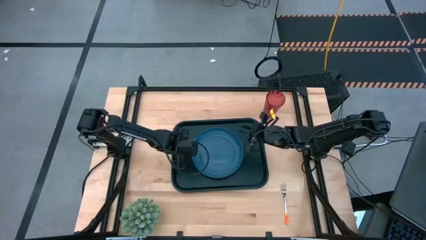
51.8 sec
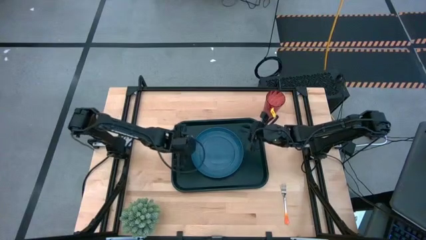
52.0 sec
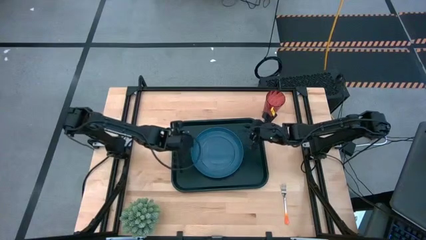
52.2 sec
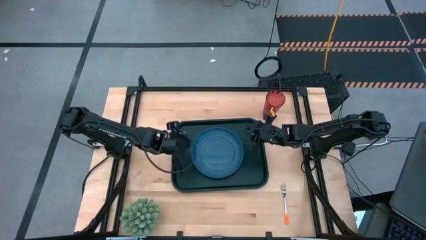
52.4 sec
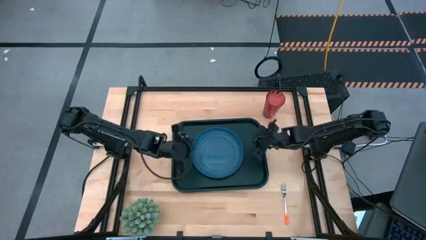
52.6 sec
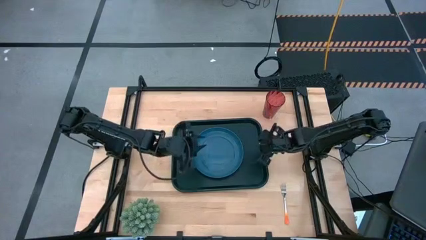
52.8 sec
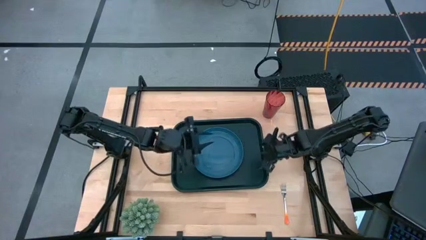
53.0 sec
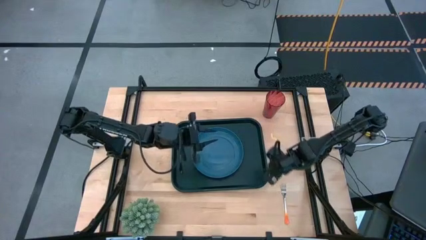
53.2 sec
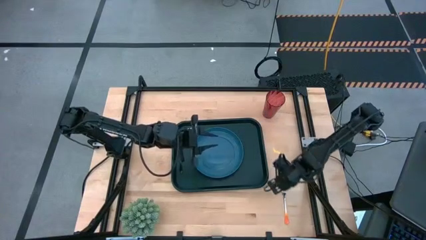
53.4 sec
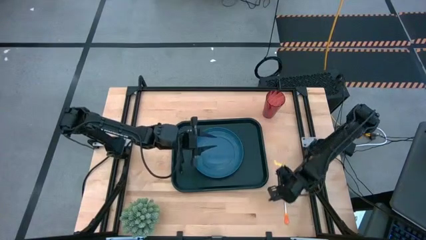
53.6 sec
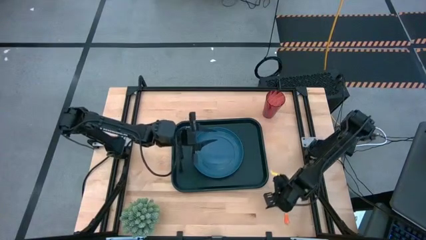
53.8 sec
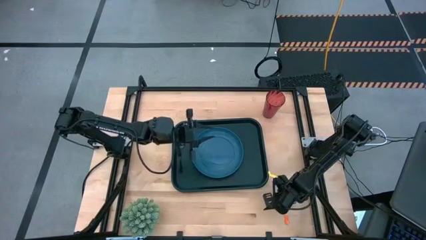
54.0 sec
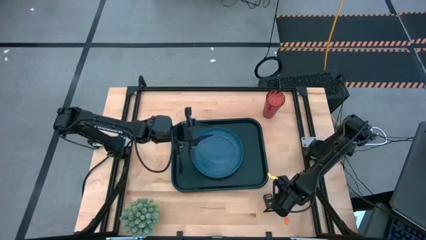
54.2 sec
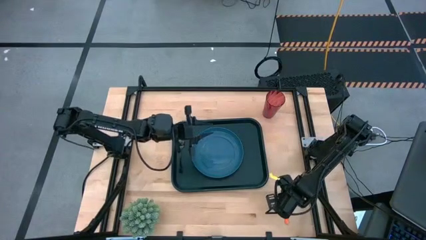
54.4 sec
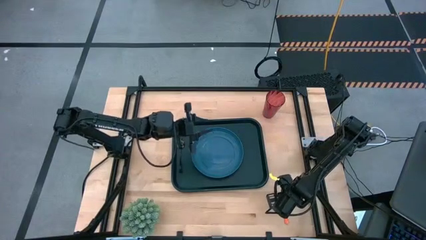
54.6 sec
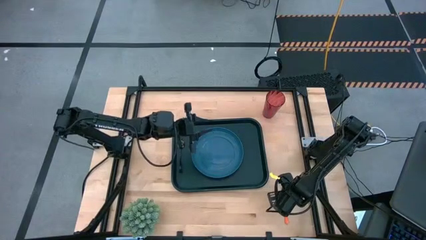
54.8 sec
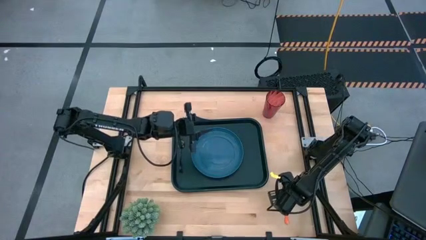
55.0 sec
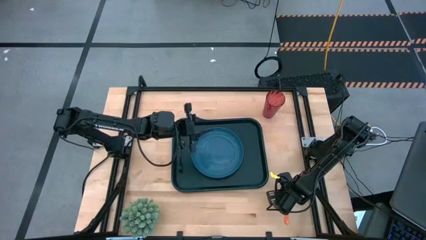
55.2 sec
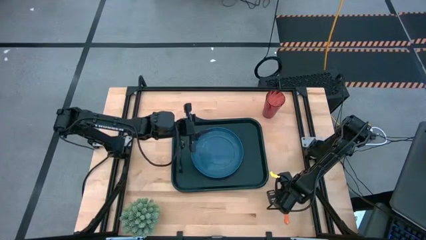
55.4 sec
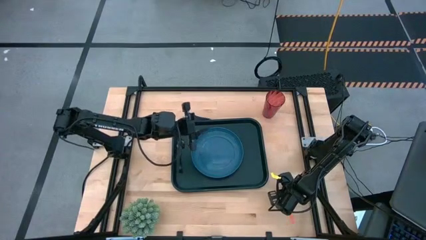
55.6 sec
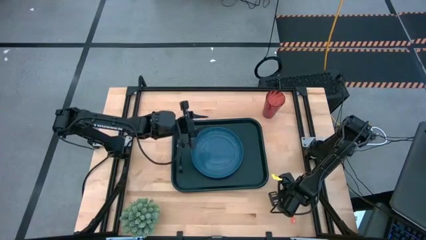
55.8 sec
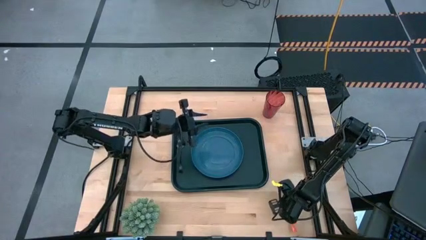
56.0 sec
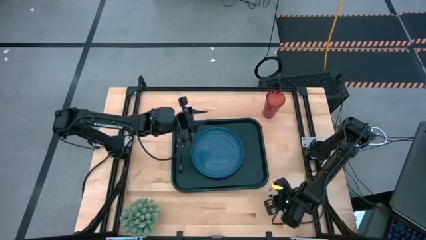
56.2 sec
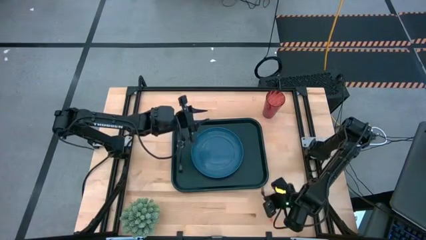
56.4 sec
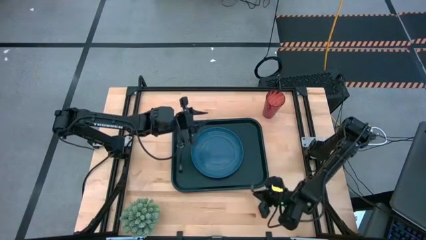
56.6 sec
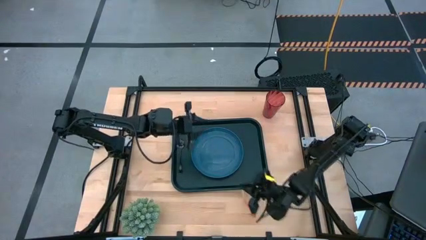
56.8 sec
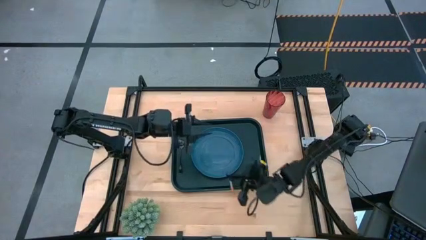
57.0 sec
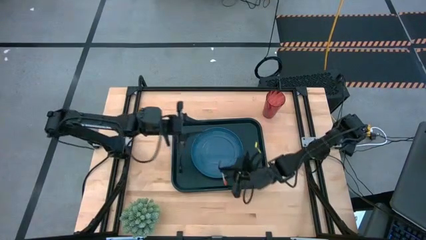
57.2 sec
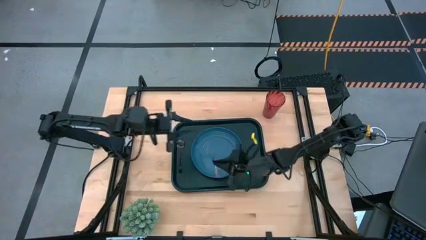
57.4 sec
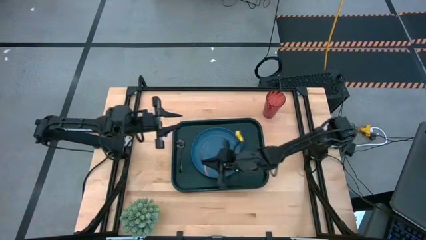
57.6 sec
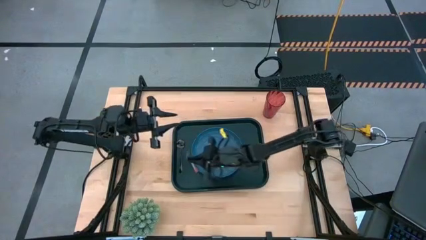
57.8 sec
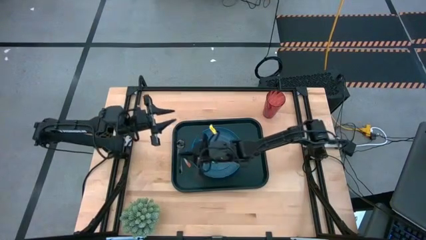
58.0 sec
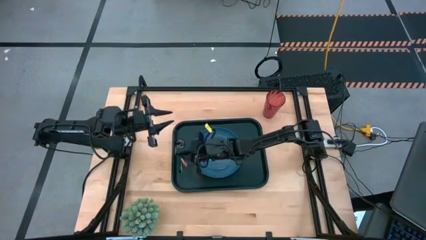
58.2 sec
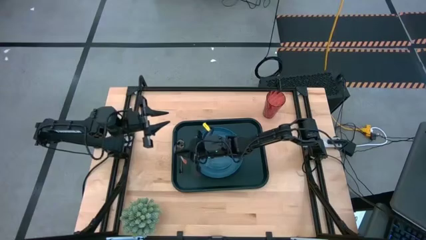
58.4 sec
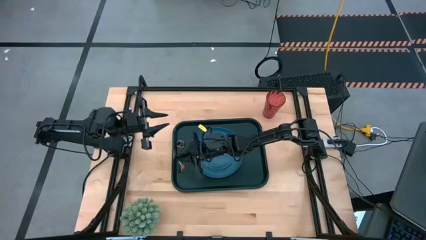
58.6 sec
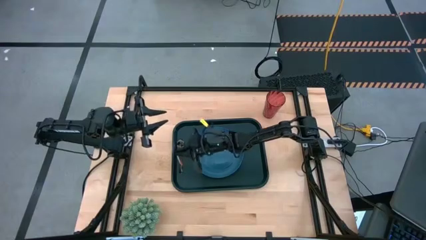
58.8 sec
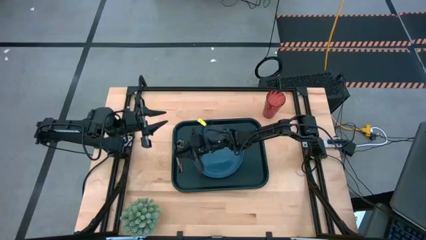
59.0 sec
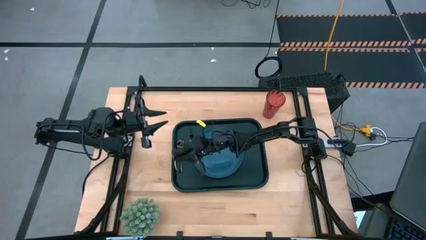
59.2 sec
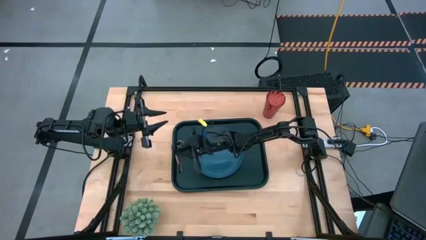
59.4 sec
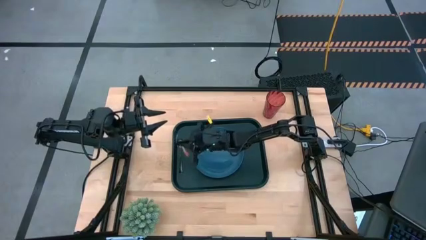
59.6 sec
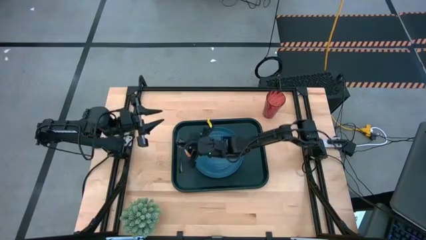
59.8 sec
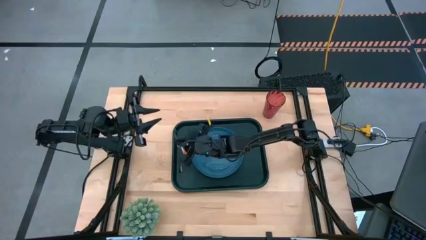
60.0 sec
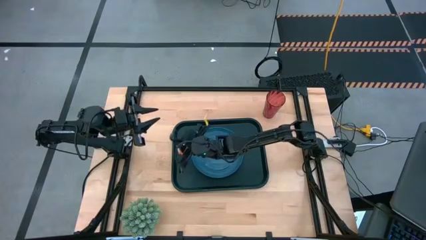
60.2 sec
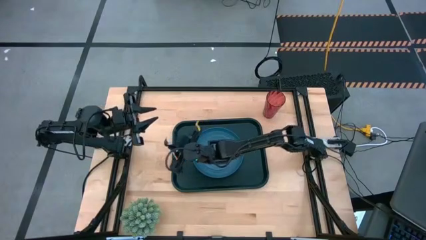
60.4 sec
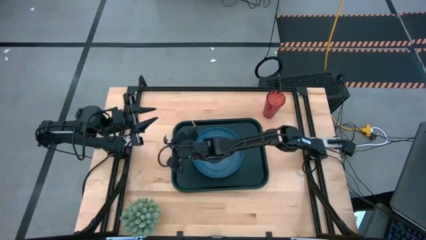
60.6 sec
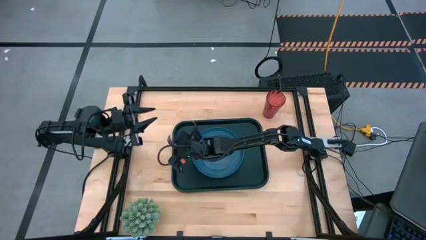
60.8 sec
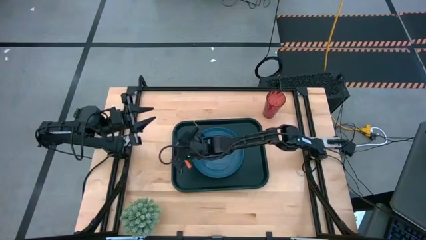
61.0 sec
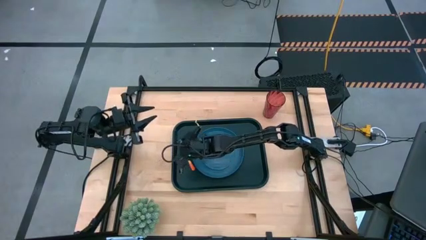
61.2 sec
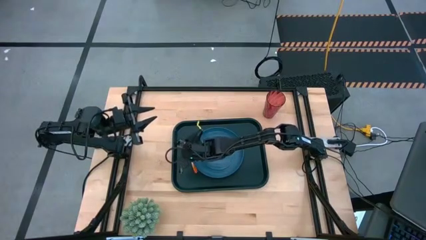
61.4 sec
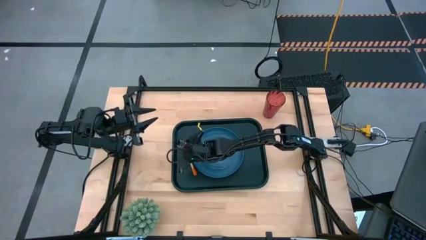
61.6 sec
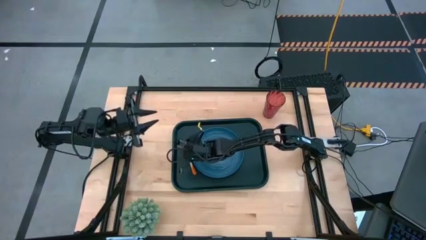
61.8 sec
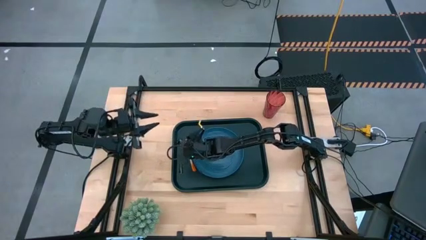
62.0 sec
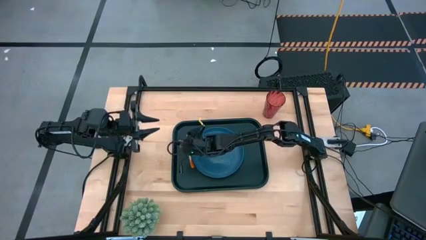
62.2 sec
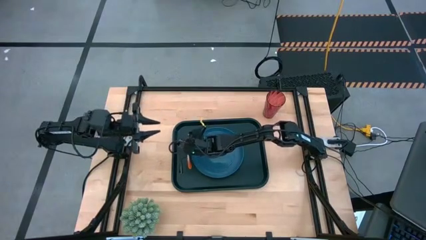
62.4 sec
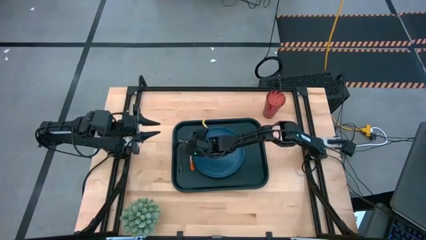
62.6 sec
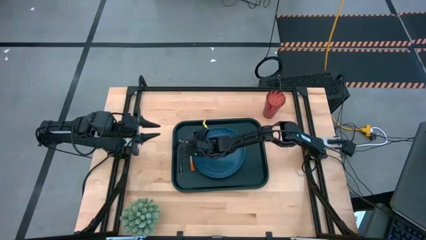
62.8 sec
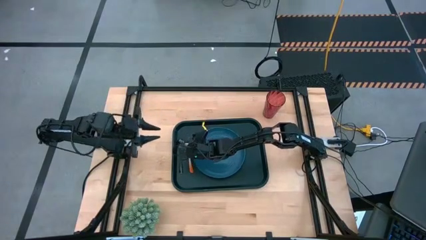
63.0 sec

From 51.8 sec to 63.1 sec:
Task: Pick and place plate/cup/fork/spoon on tray
Put the orange fork between the black spoon and blue plate on the black tray

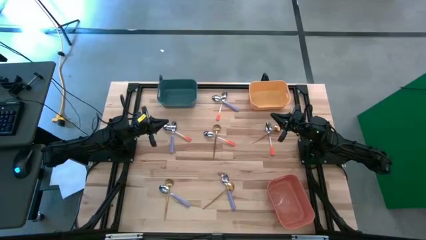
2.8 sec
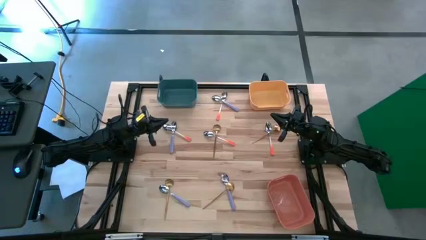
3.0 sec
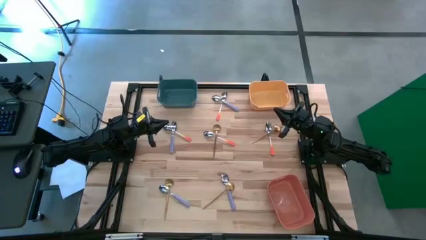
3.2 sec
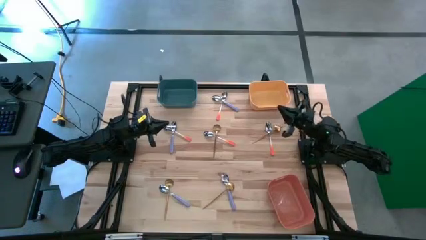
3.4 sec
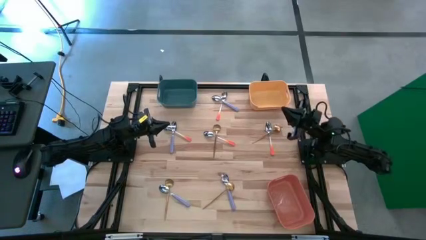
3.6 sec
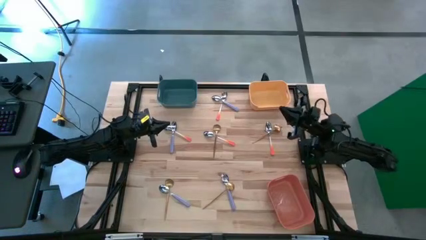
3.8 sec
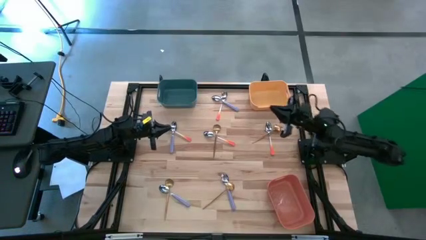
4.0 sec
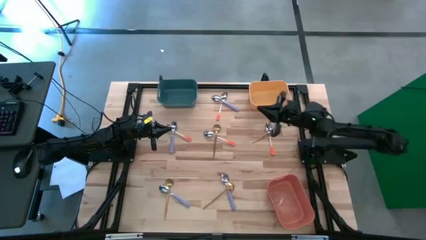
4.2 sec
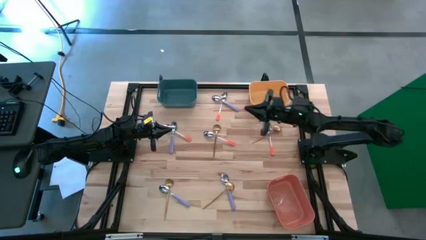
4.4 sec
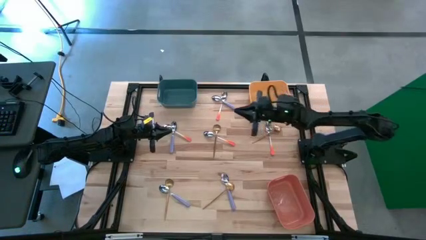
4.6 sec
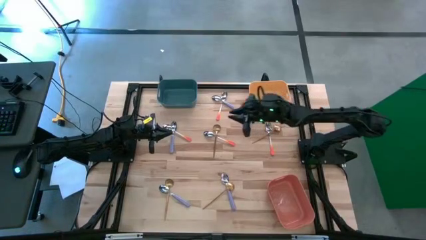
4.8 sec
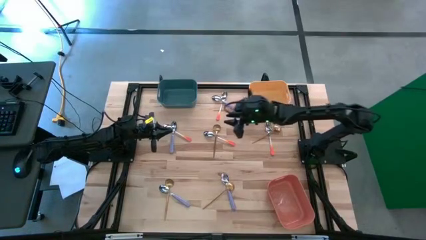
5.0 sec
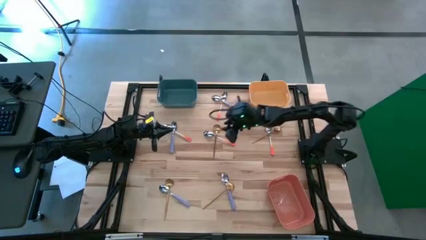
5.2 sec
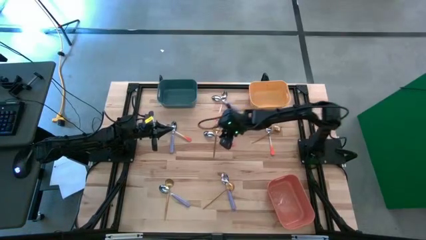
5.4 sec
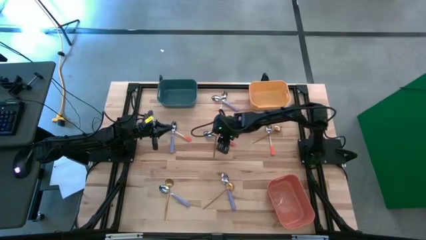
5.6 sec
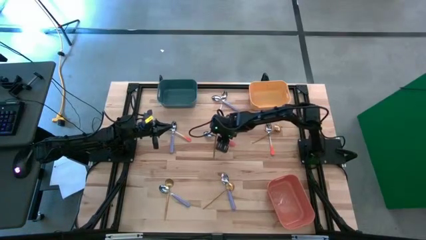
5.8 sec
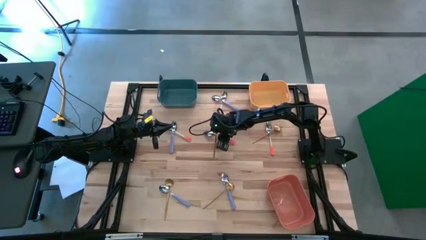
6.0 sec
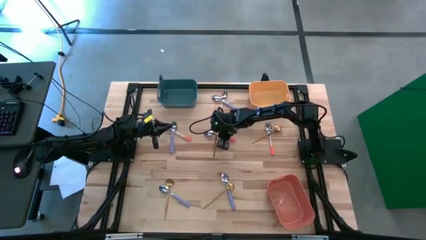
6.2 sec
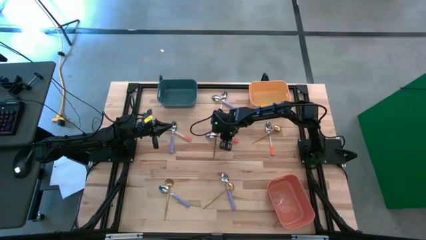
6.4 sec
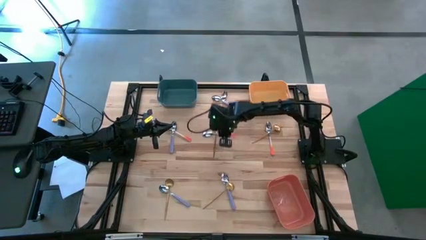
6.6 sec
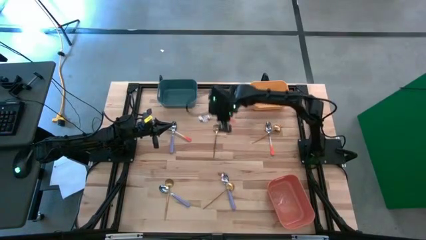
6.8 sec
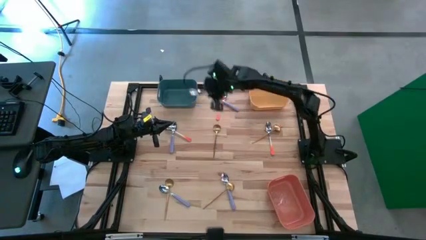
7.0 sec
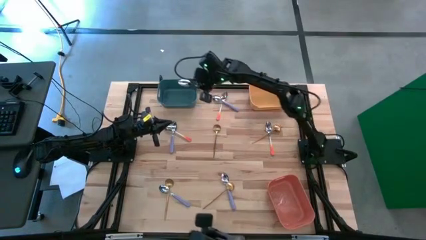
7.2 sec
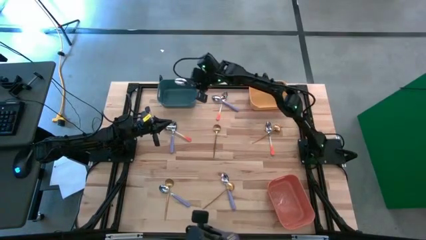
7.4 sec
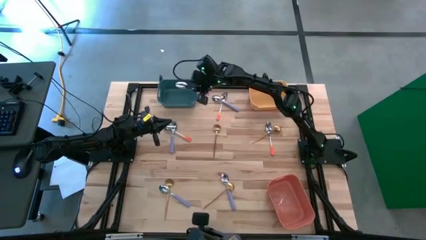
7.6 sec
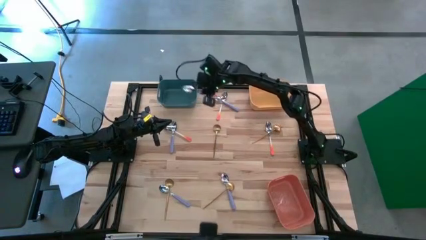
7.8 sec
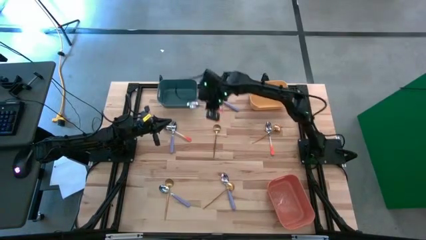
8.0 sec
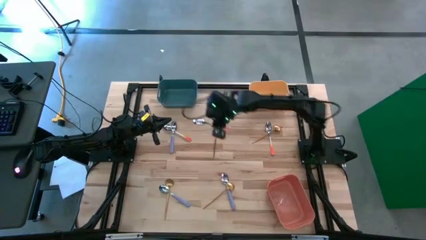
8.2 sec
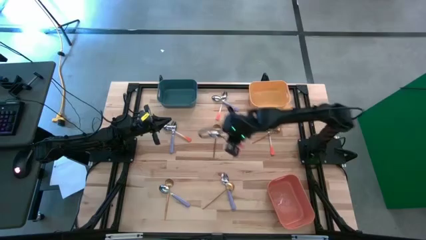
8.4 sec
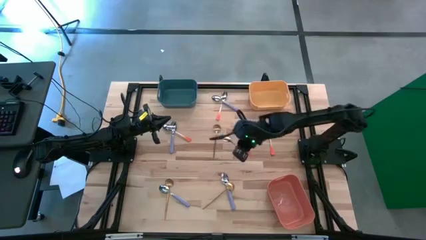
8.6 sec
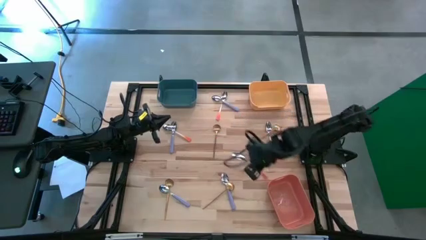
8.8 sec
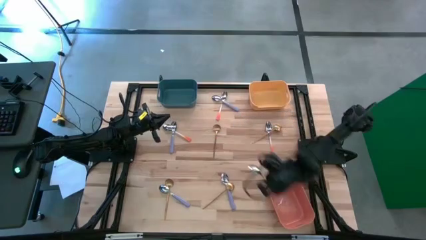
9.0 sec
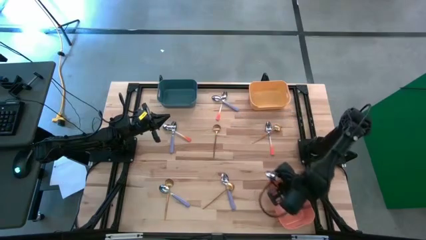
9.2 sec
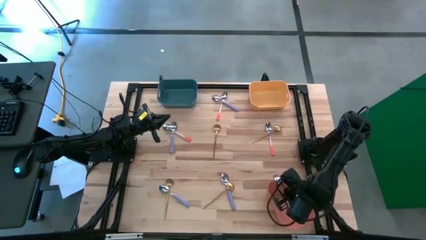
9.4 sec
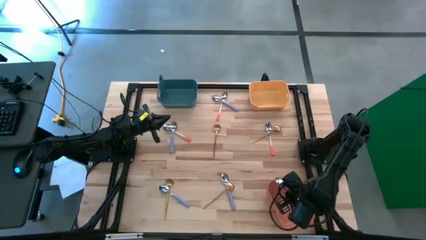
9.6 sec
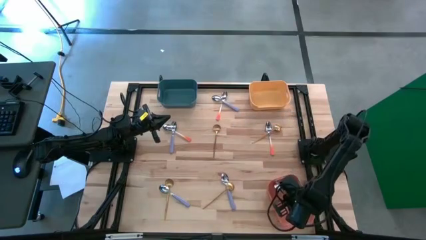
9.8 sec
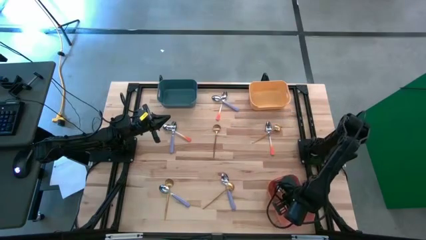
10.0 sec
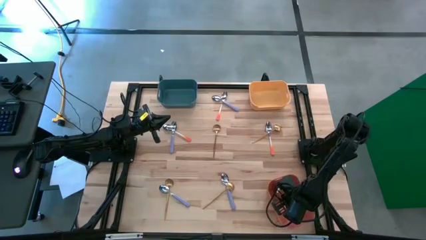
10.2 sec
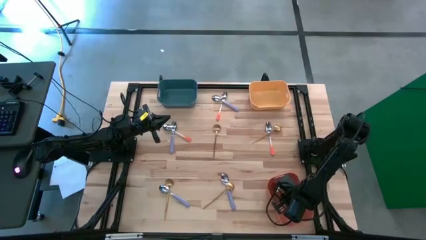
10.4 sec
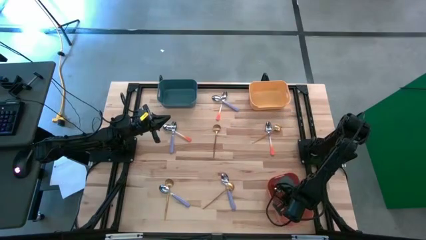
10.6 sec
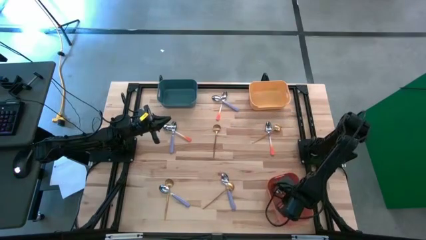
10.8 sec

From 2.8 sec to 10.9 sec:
Task: Sort silverware by color (type)
Put the center orange spoon into the orange bin
